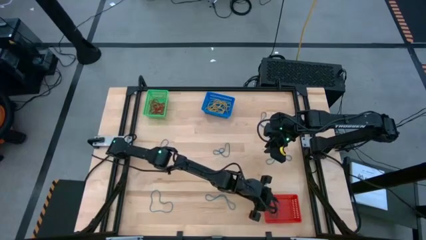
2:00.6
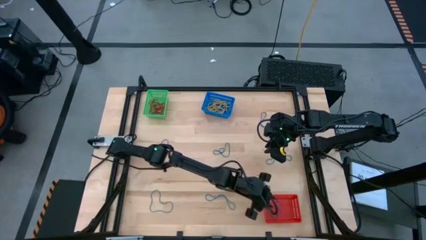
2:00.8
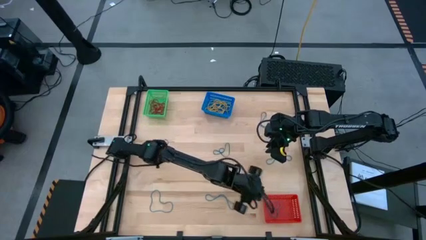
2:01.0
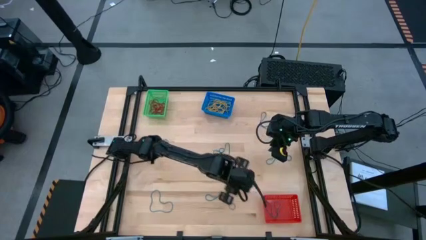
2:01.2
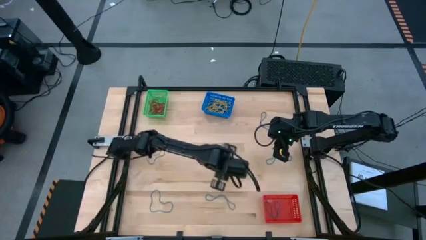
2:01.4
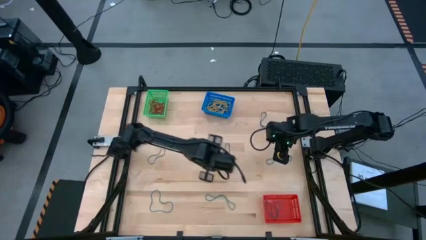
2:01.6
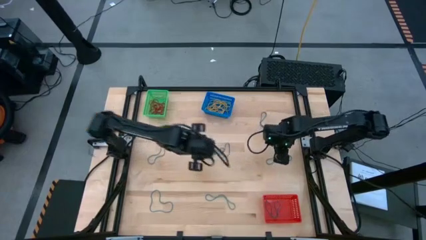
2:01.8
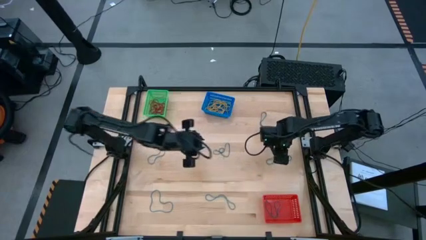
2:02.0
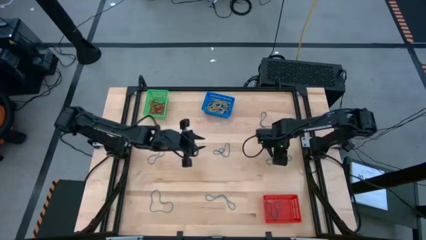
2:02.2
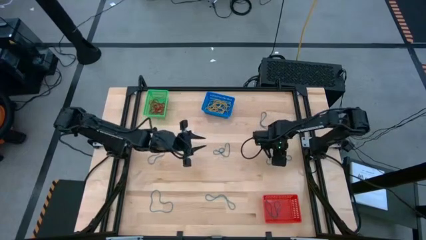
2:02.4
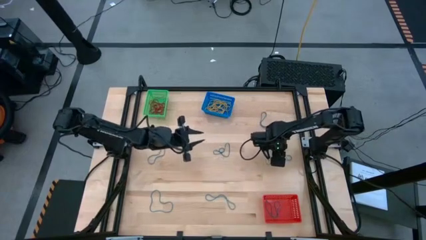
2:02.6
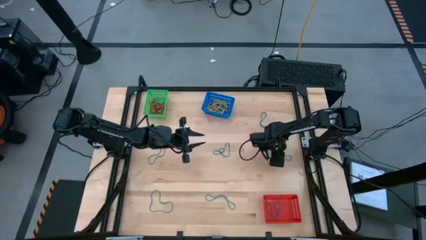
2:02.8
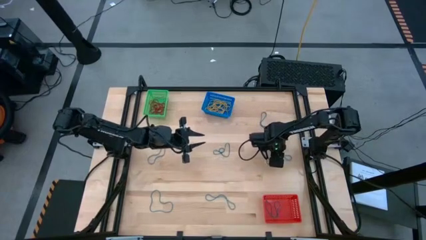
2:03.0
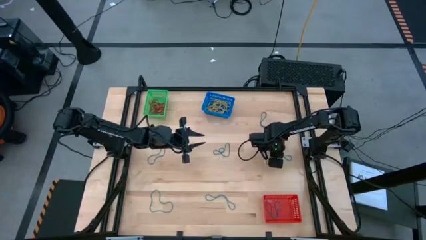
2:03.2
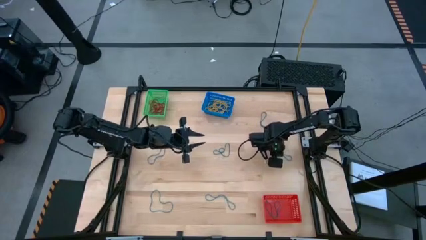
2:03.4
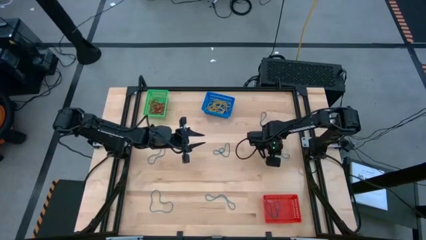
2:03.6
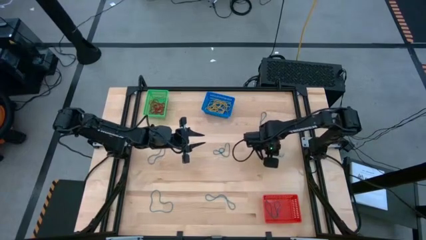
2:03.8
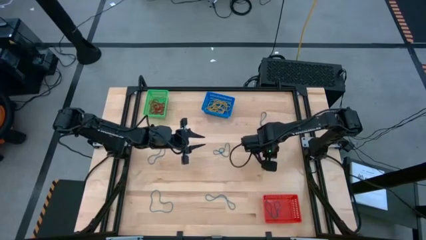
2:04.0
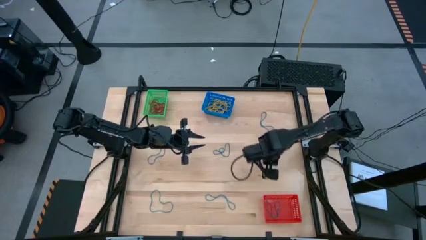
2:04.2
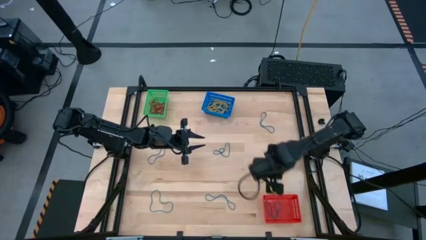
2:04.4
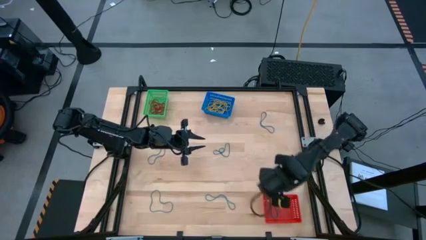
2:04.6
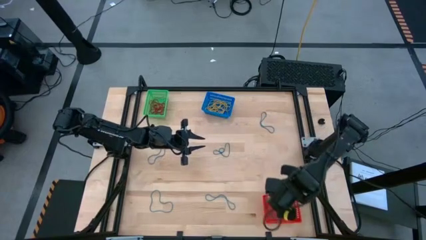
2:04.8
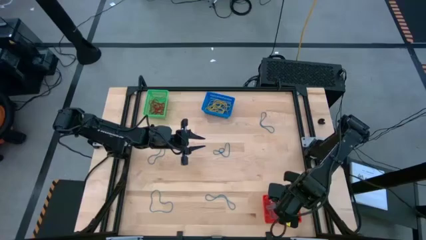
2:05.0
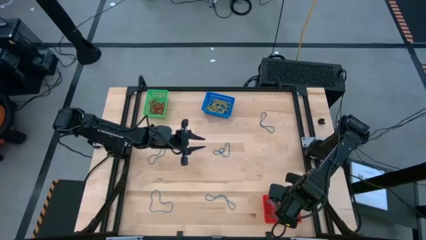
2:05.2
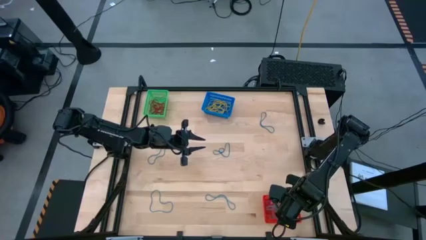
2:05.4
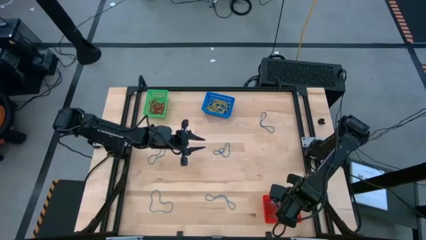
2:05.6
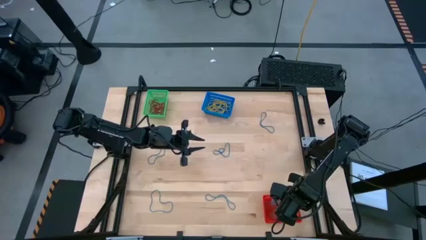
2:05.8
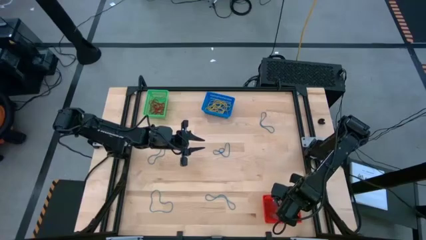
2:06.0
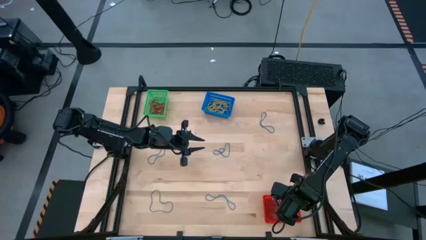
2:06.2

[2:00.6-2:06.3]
Task: Sort rubber bands into baskets
Put the blue rubber band into the red bin

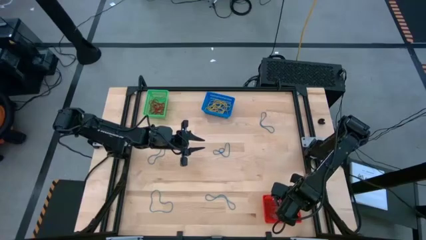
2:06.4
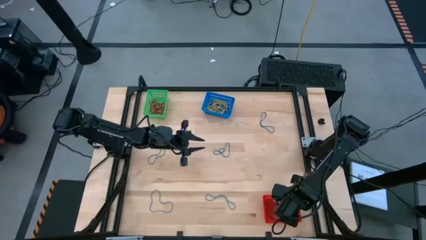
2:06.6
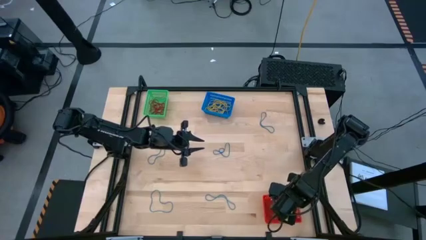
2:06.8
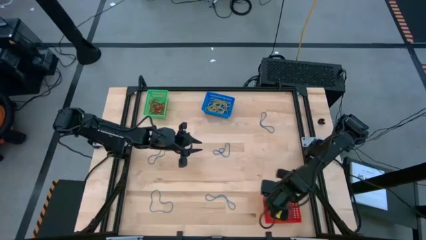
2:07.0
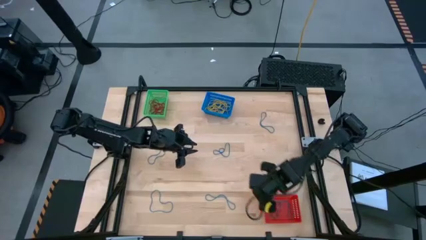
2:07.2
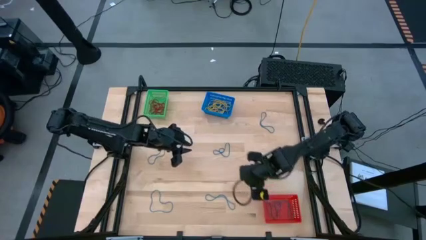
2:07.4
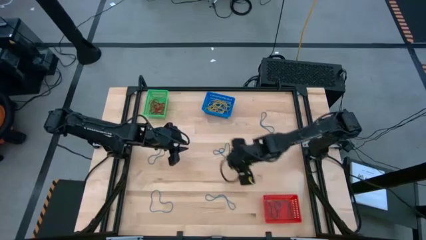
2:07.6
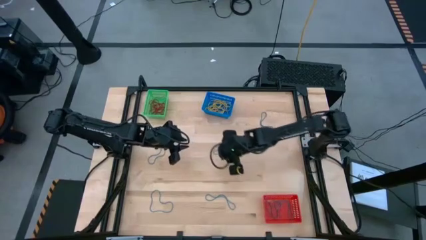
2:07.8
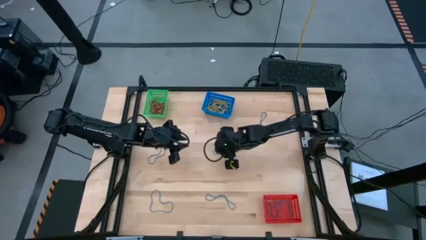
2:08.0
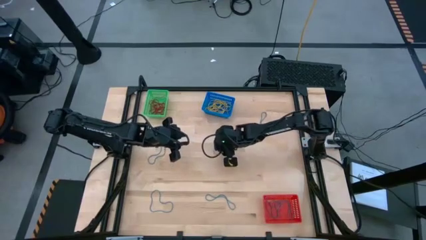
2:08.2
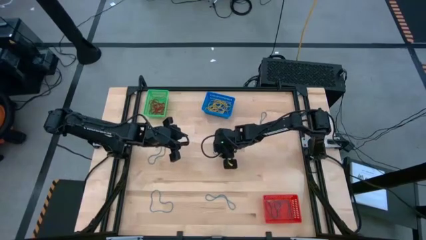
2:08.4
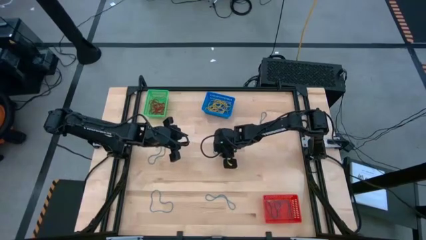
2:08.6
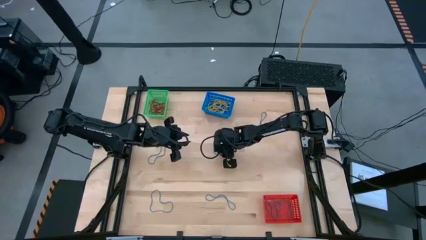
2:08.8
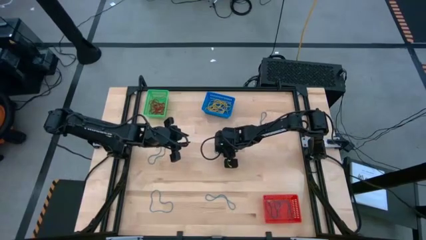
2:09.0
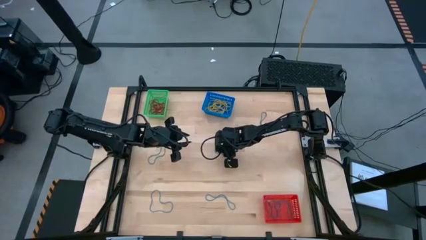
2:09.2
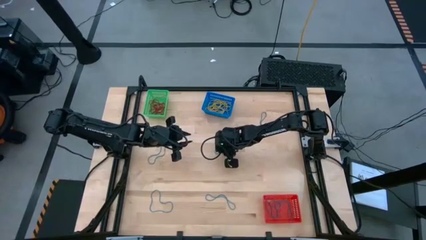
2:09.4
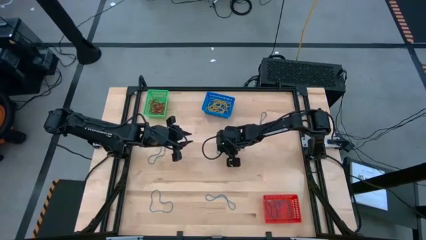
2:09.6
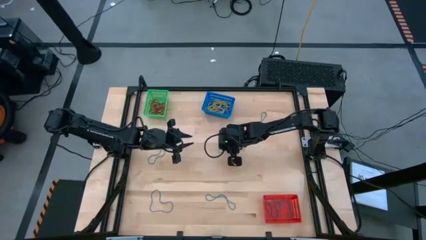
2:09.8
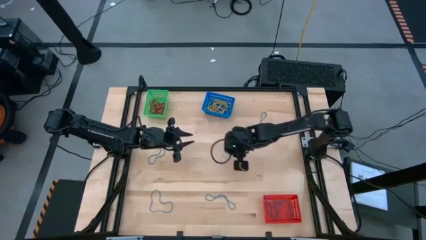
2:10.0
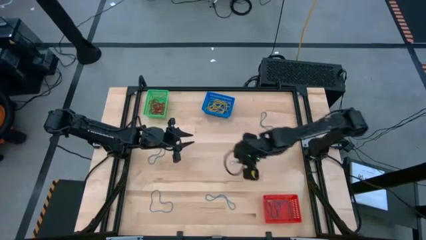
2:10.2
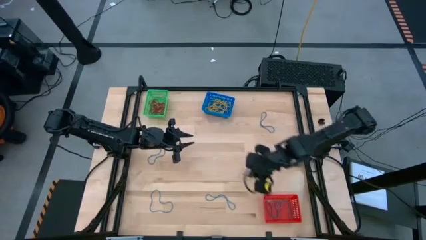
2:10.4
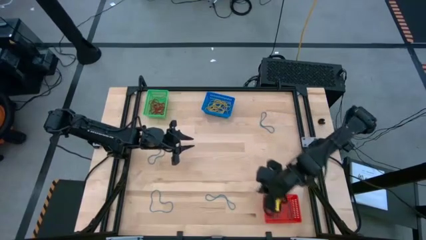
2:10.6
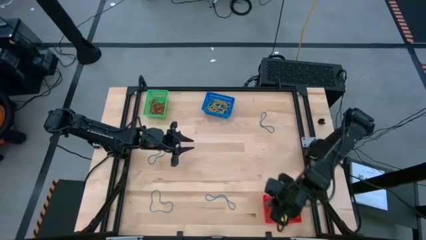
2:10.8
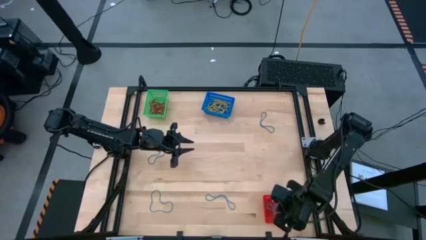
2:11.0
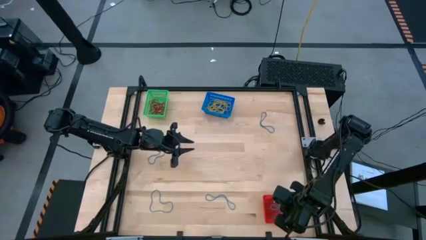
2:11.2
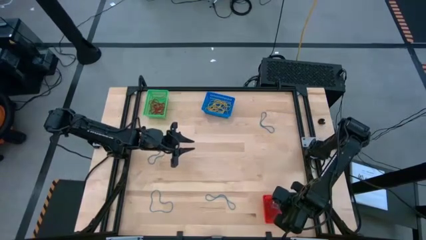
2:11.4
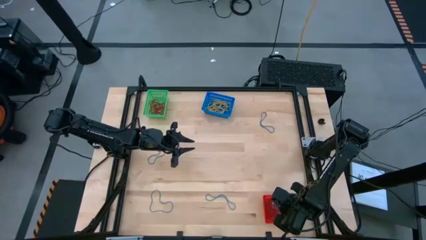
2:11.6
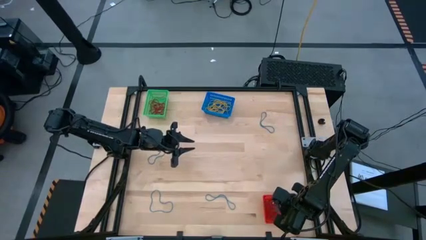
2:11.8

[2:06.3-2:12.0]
Put the blue rubber band into the red bin

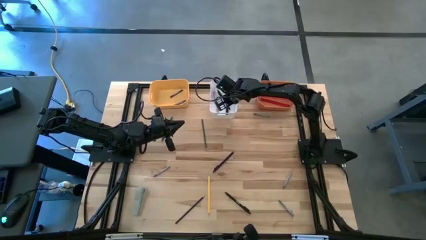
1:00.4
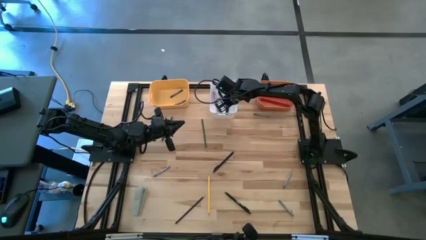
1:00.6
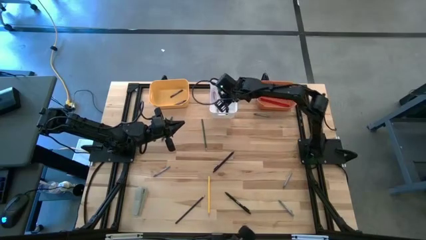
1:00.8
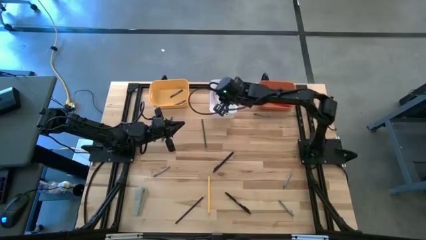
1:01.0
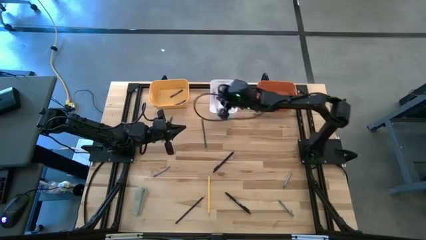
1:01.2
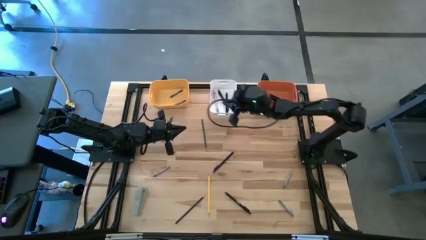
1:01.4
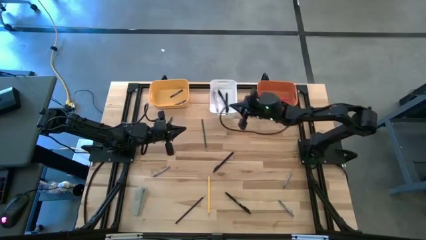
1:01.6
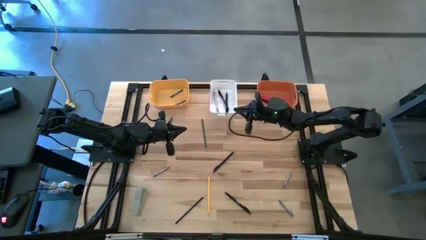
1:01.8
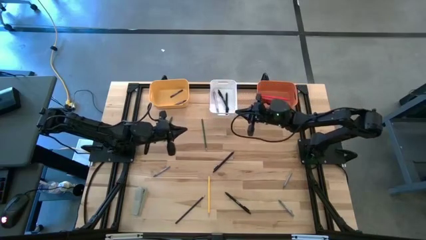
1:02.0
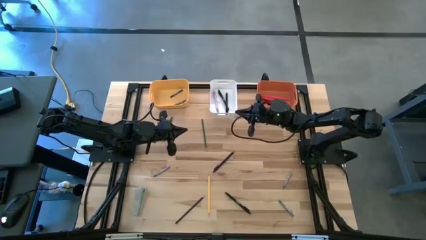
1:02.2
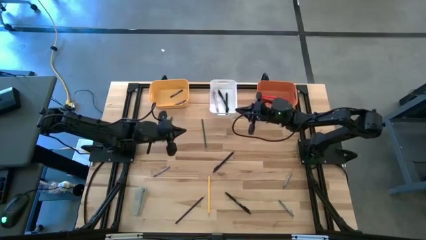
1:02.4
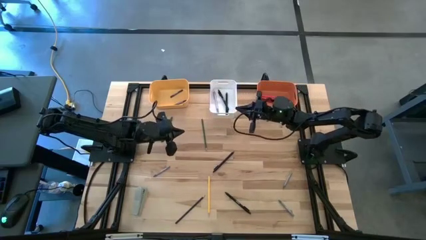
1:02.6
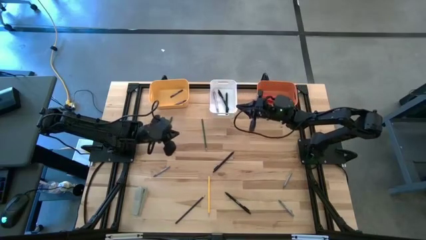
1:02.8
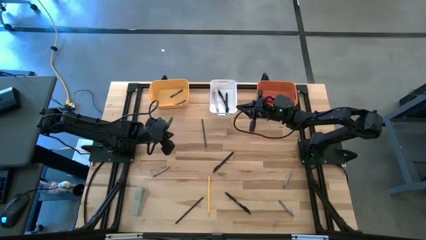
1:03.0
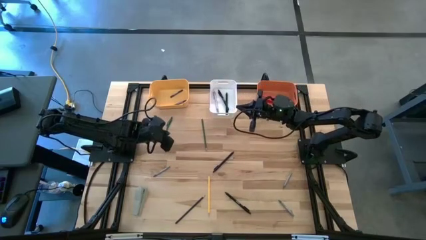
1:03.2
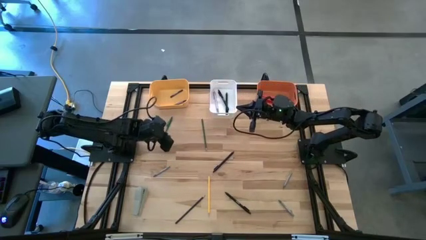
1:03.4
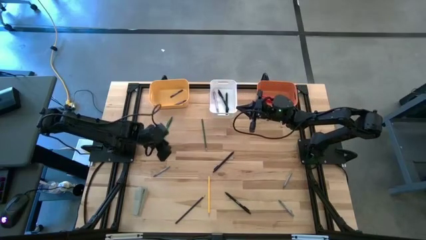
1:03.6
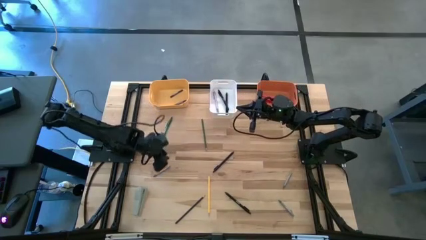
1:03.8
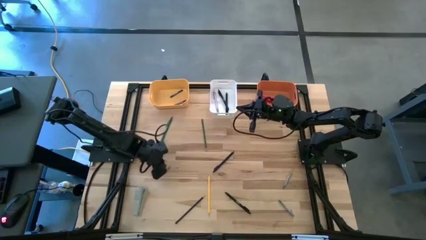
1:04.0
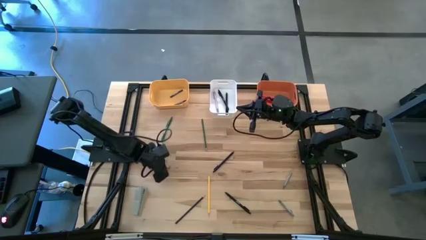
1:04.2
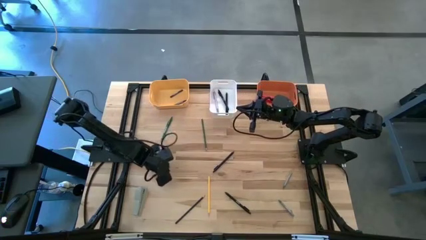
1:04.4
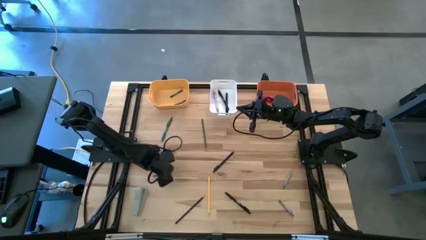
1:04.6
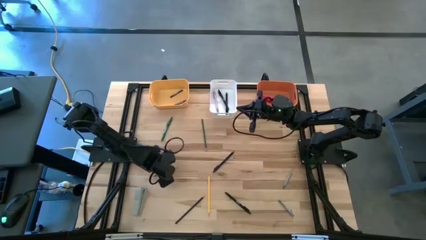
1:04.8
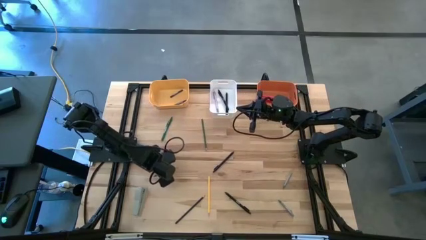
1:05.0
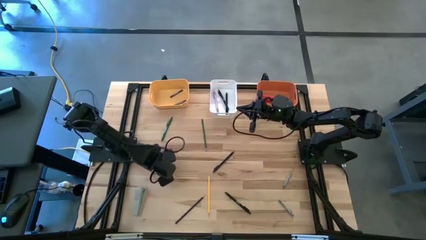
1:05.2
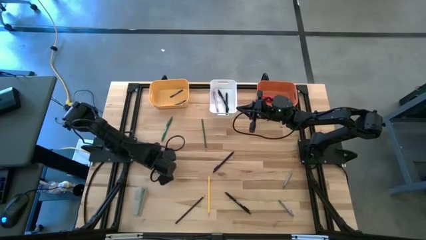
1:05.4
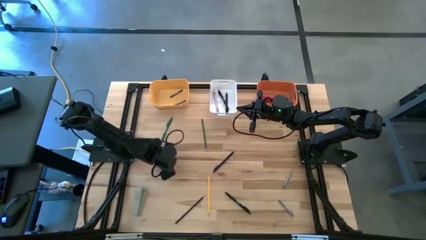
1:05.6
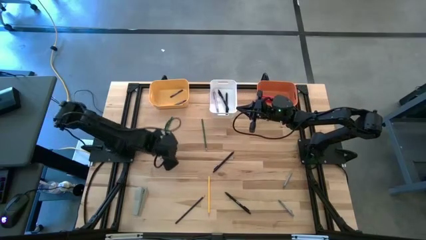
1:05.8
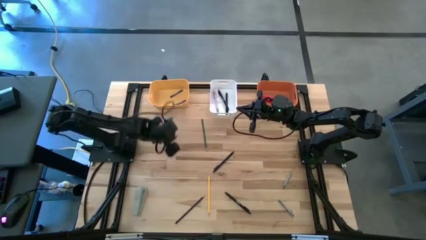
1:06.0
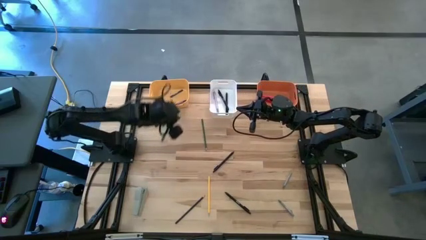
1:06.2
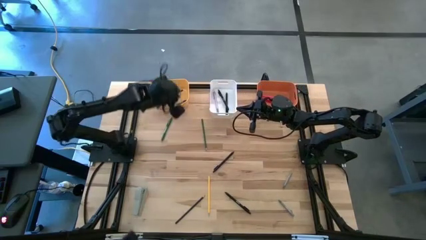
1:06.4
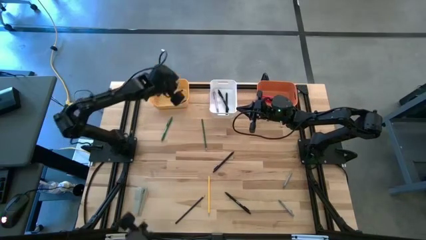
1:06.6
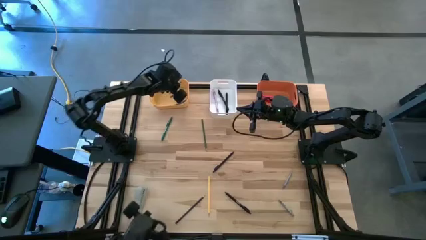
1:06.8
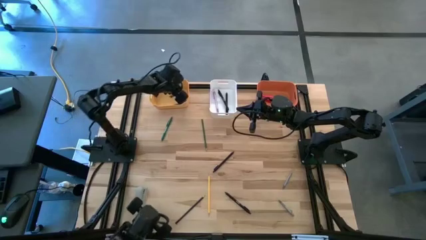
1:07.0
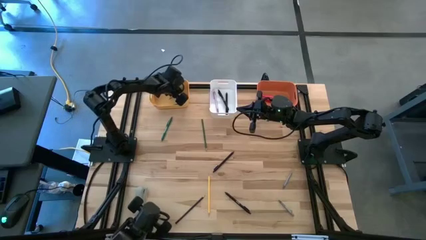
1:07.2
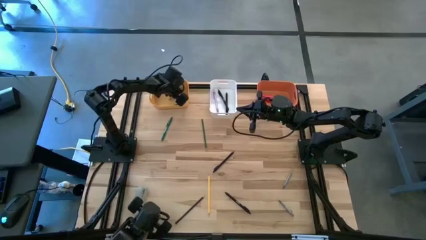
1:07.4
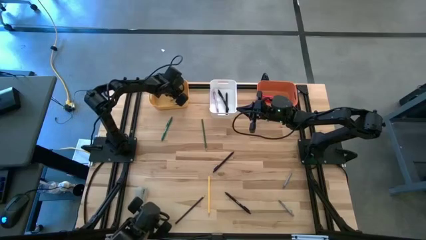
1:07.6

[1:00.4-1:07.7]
Task: Sort crayons/erasers/pens/pencils in bins
Put the gray crayon into the yellow bin
